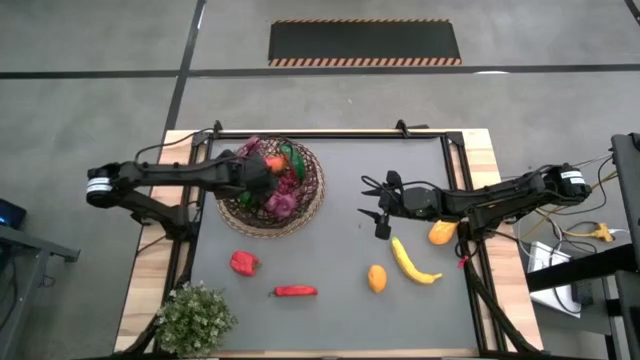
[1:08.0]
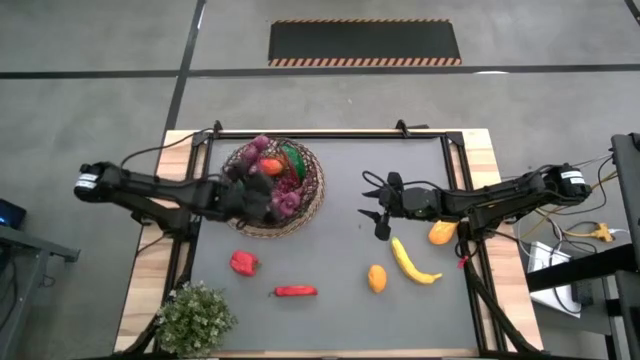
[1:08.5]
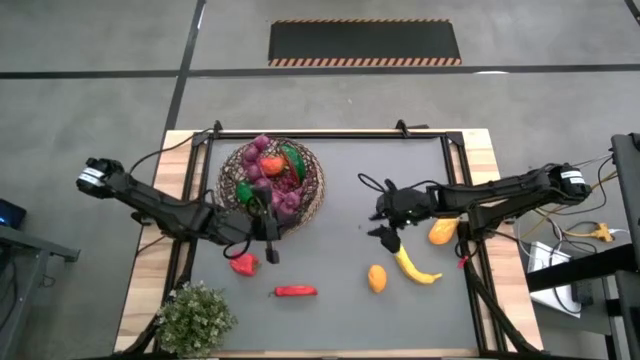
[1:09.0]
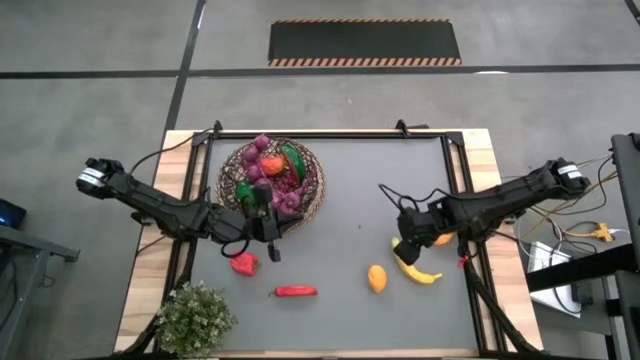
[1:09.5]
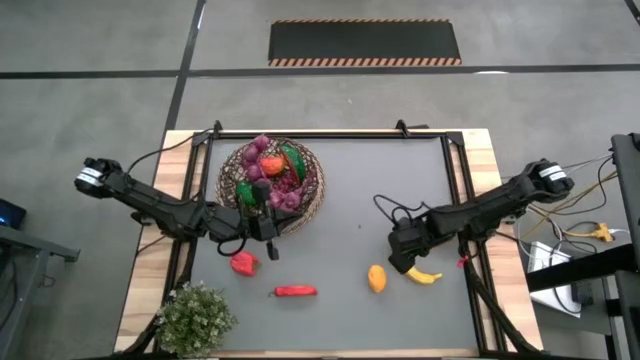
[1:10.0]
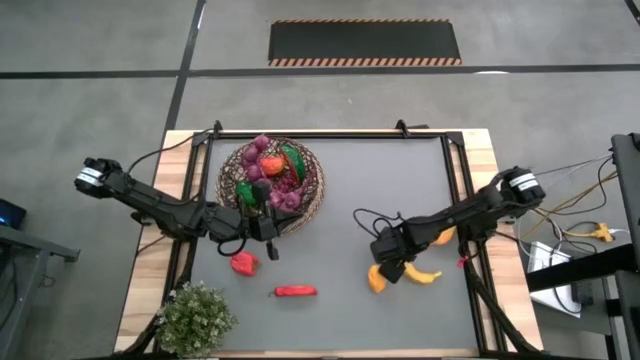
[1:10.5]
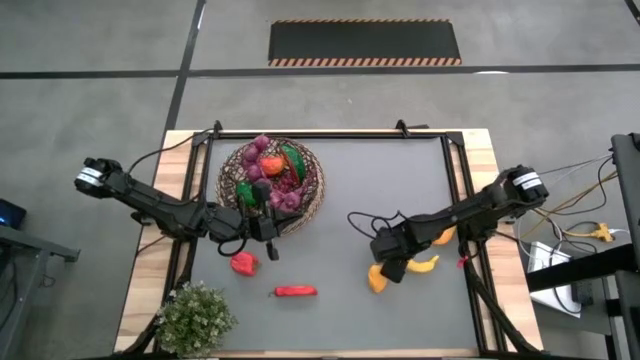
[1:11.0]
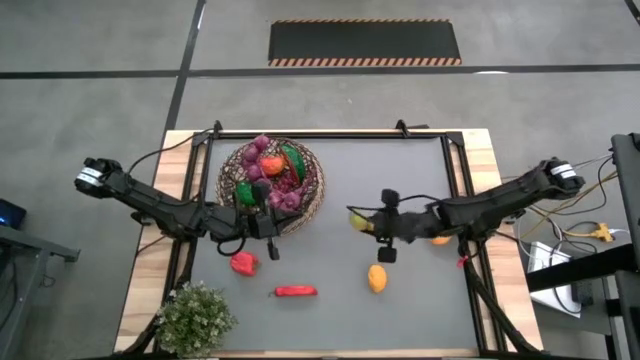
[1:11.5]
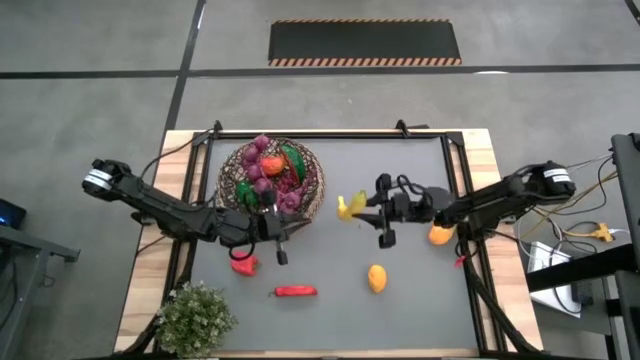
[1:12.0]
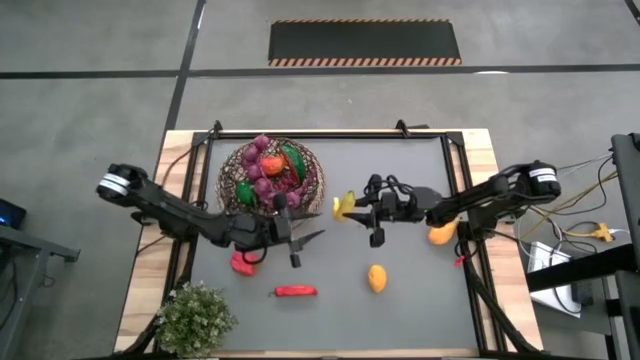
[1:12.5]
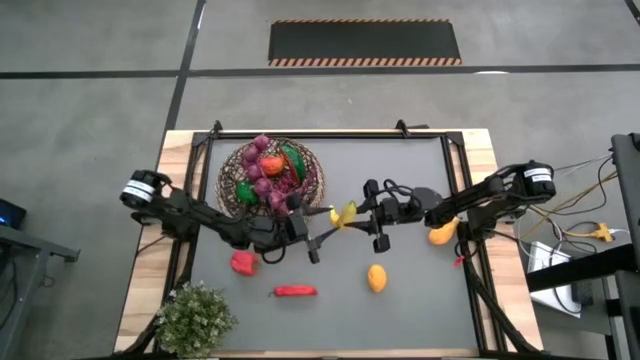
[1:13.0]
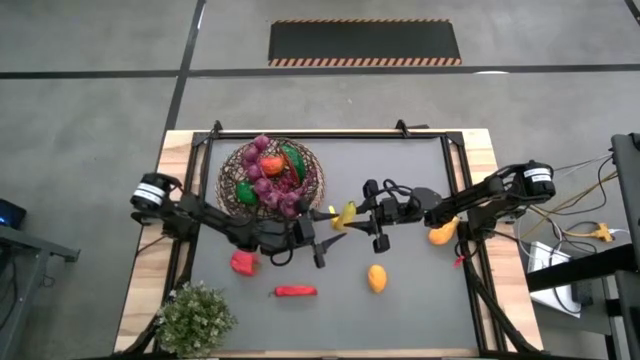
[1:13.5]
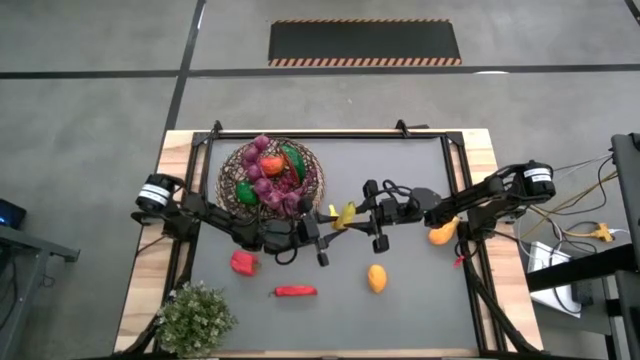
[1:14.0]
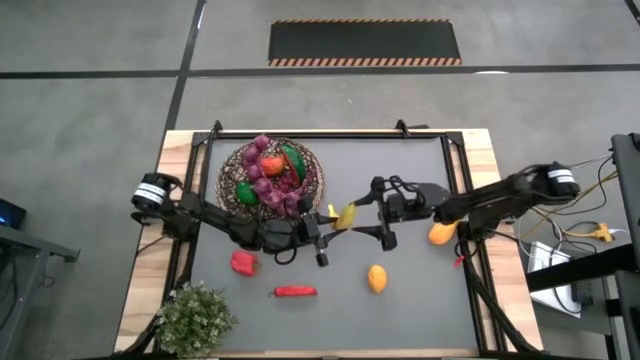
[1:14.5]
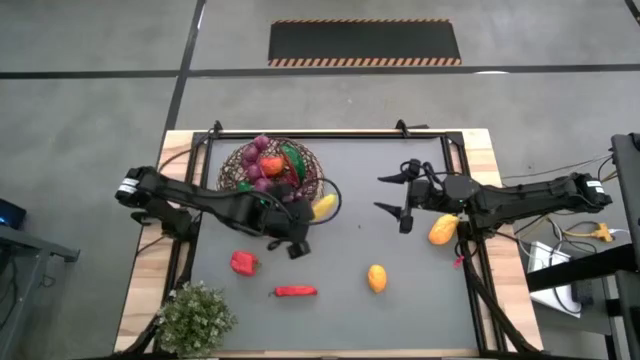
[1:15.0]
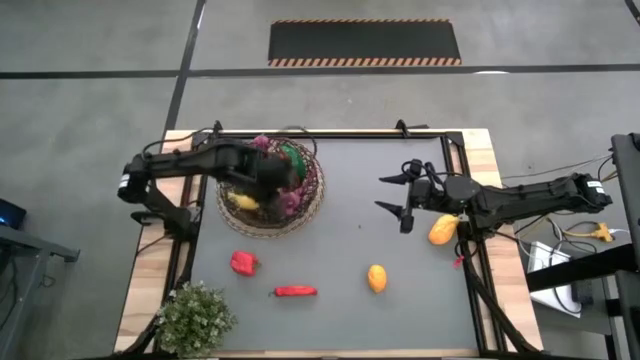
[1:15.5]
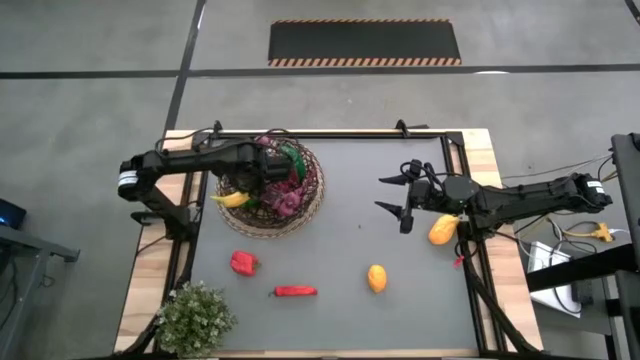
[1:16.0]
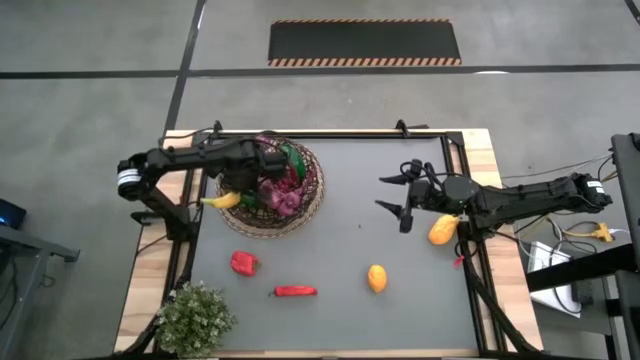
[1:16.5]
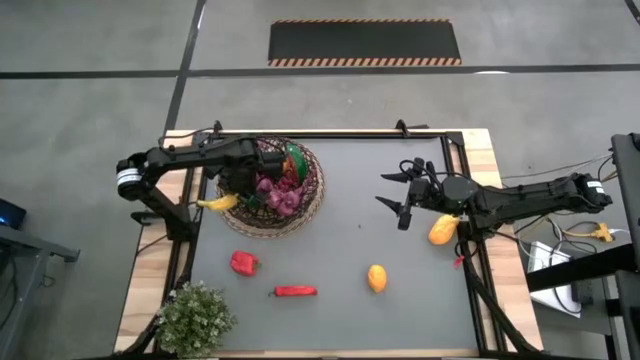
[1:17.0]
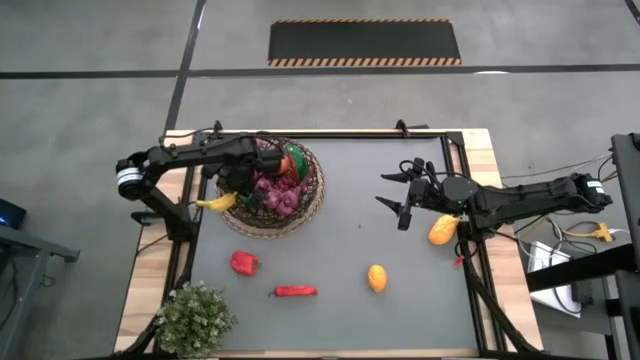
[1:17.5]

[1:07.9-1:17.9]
Task: Build produce basket
Put the banana into the wire basket

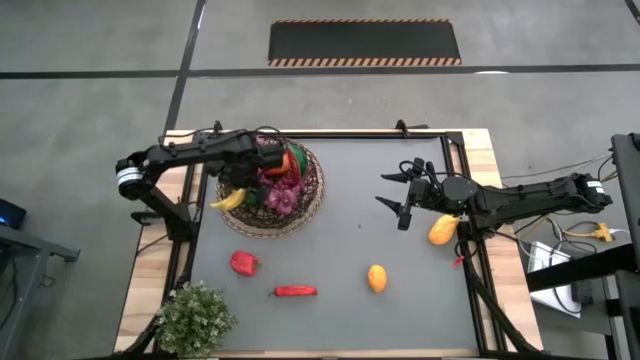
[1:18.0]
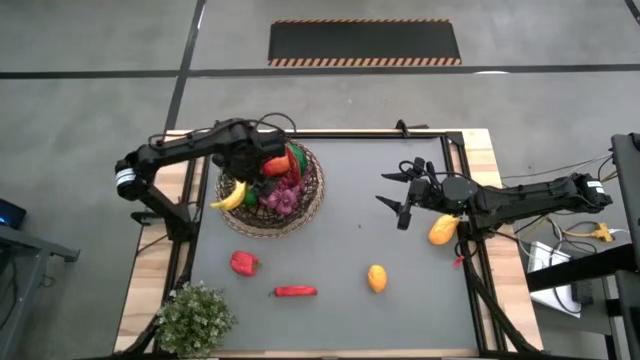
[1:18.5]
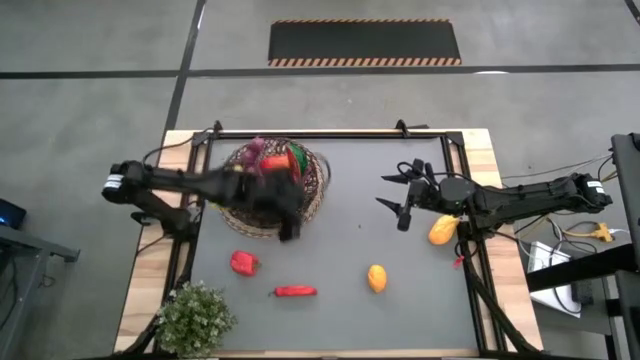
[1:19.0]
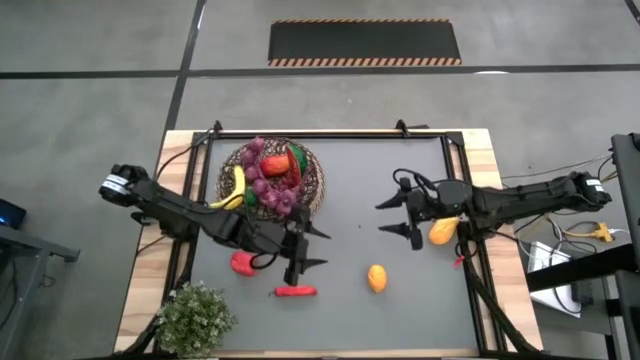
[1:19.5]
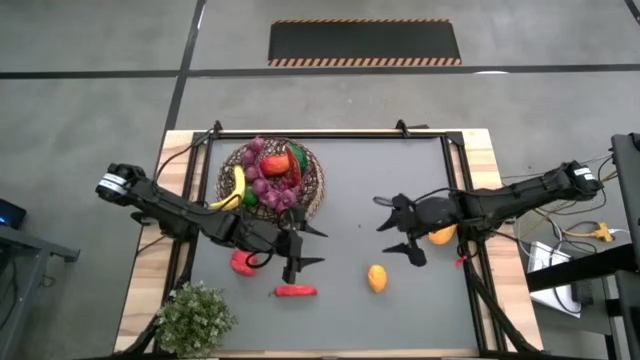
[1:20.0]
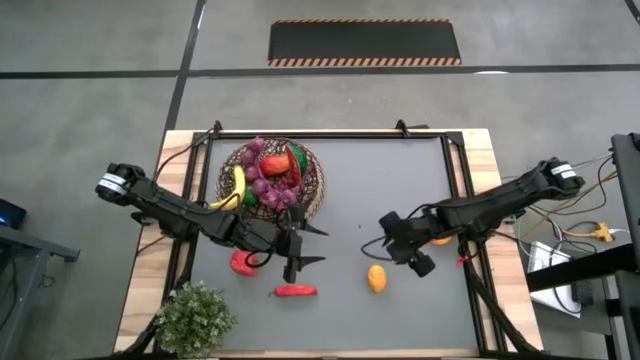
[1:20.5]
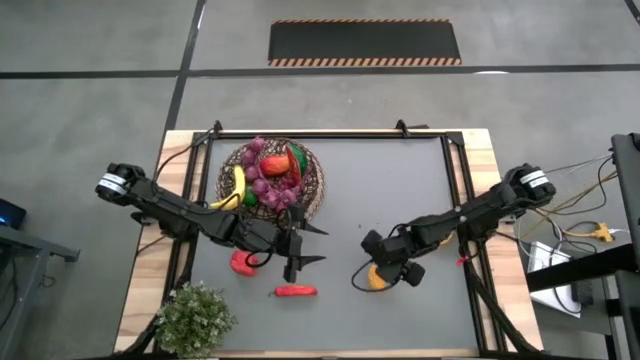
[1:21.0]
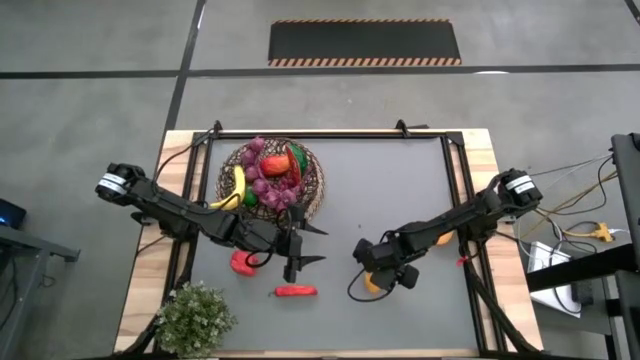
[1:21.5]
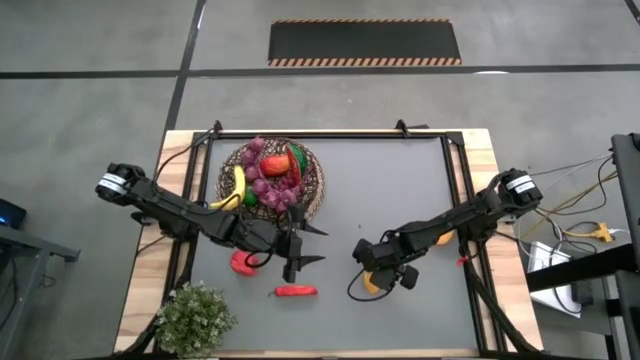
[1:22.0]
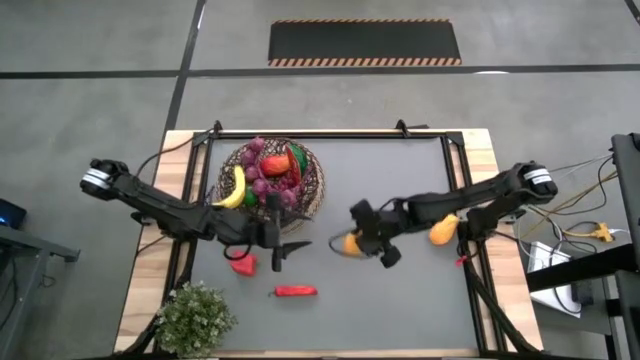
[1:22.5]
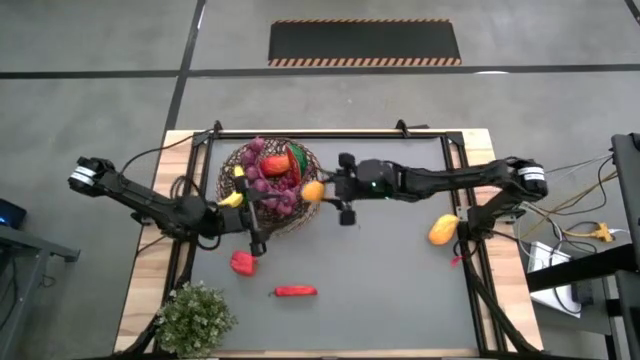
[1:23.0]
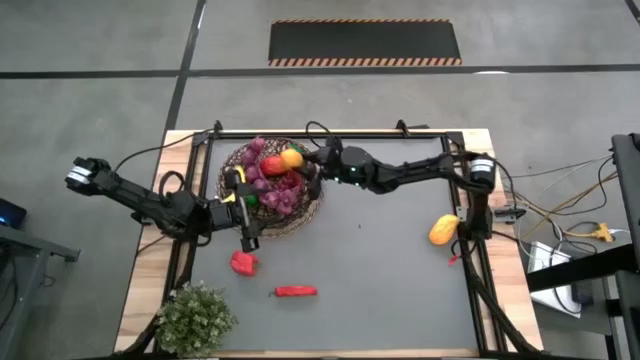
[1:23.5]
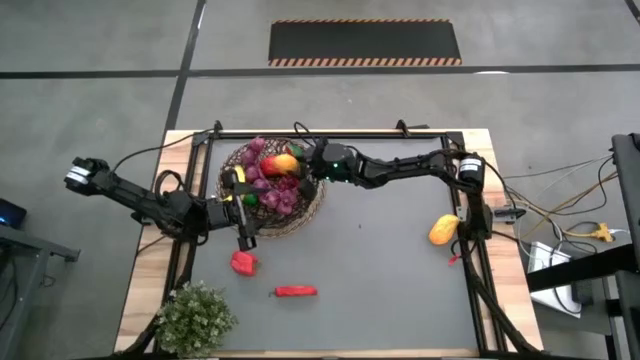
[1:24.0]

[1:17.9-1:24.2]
Put the yellow lemon into the wire basket

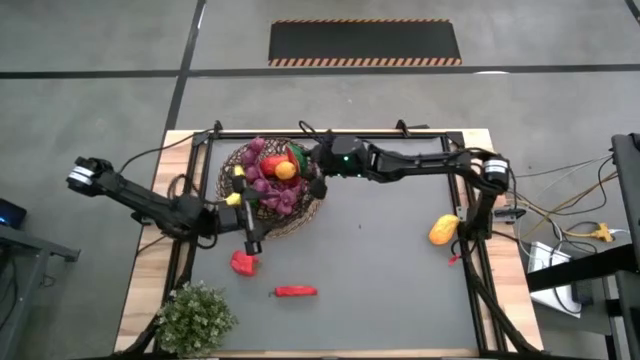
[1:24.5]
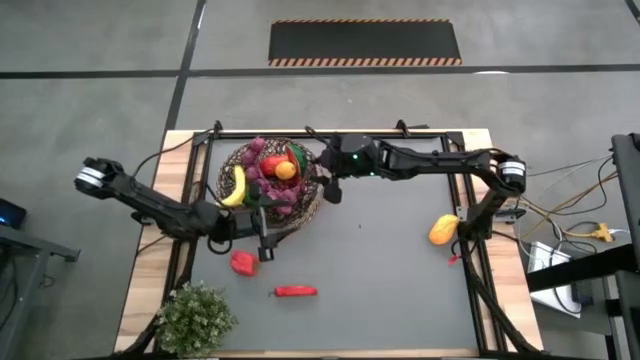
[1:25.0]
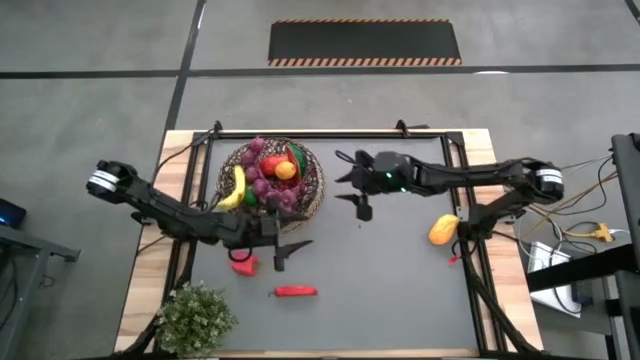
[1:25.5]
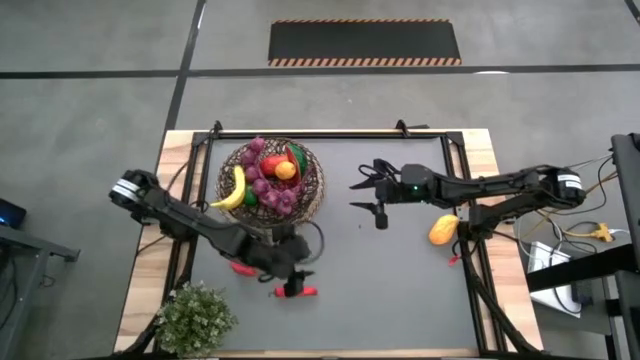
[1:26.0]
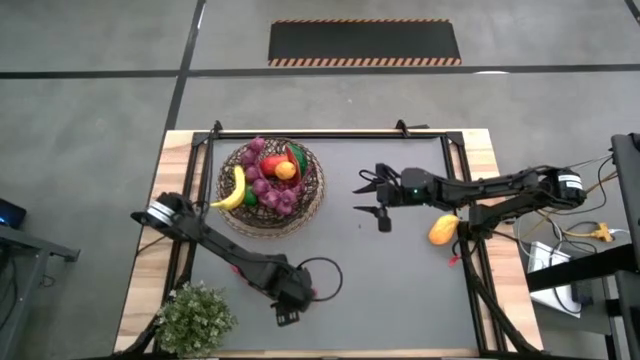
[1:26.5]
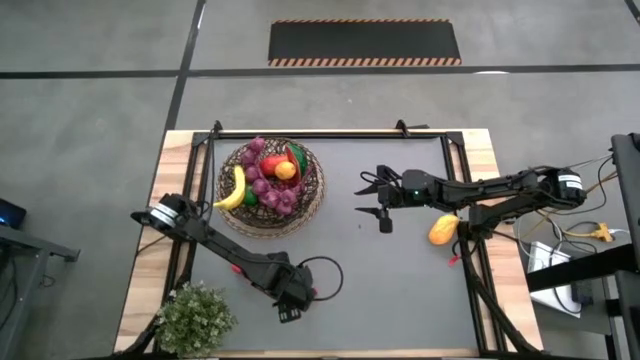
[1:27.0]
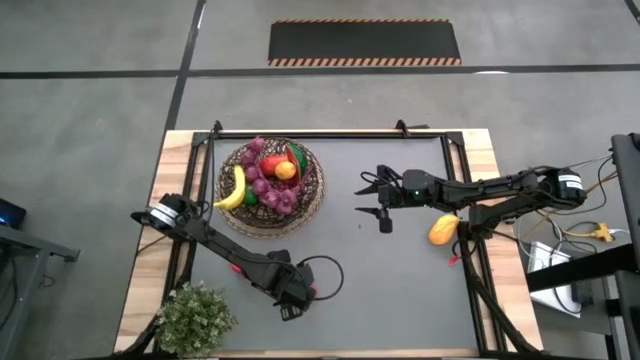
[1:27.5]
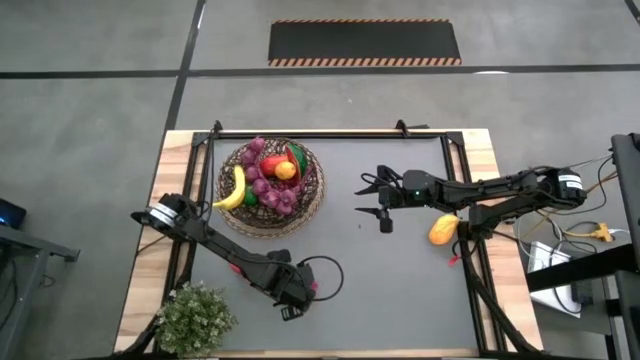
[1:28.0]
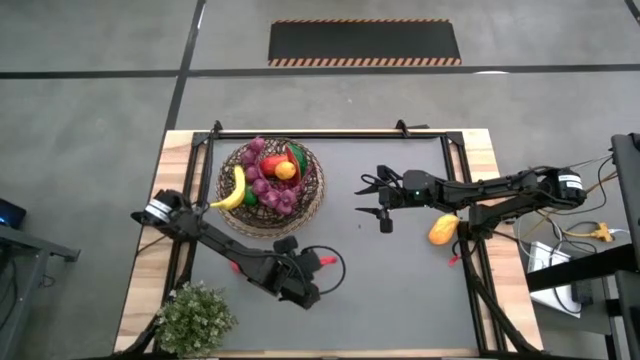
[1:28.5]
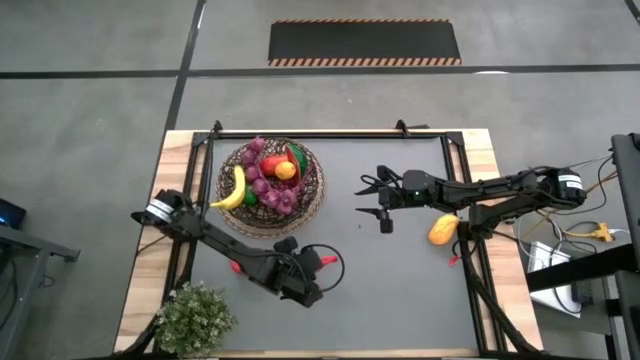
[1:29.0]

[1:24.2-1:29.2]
Put the red chili pepper into the wire basket

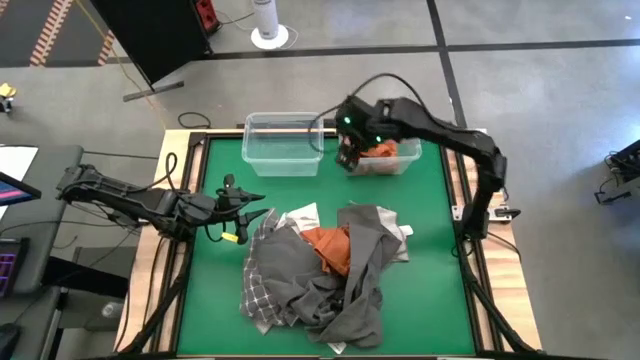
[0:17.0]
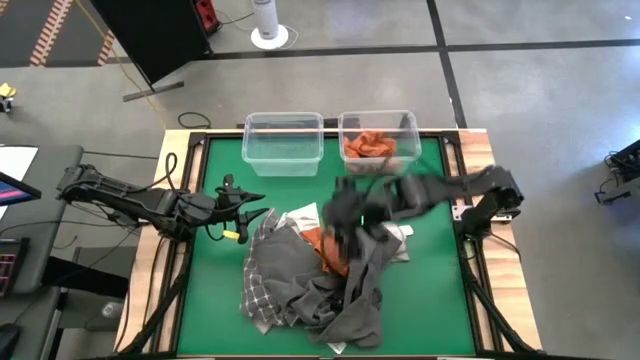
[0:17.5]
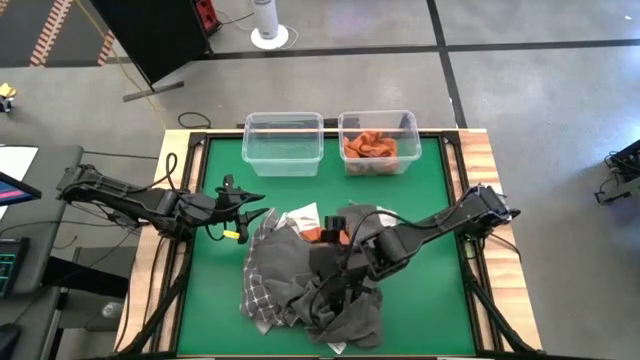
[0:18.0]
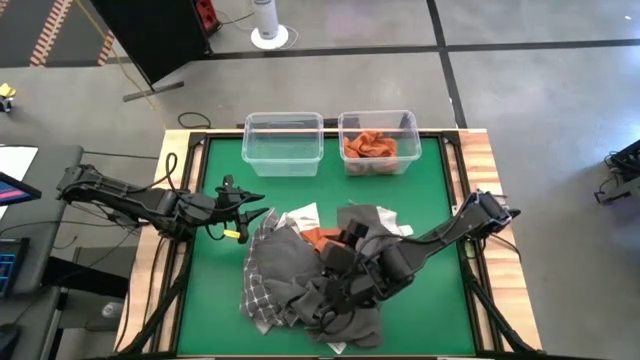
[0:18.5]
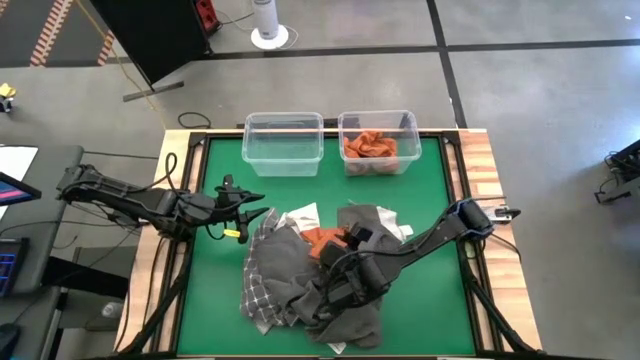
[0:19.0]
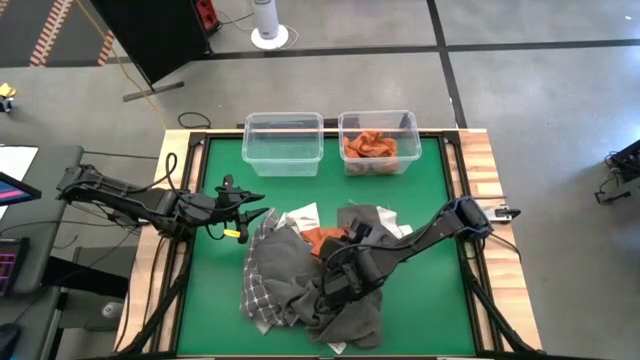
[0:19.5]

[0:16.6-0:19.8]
Task: Sort towels by color in basket
Put the orange microfiber towel into the right transparent bin
